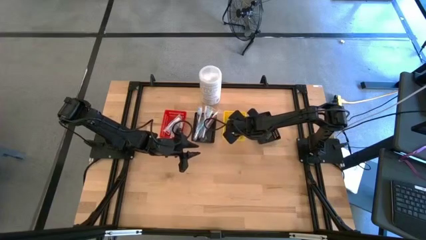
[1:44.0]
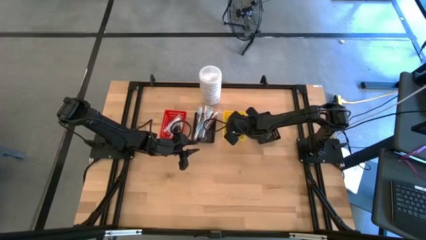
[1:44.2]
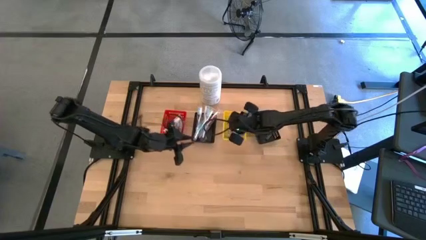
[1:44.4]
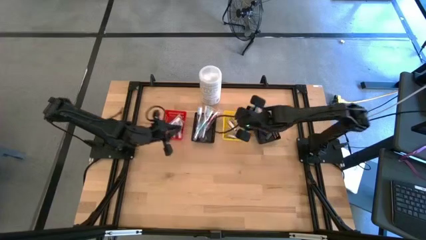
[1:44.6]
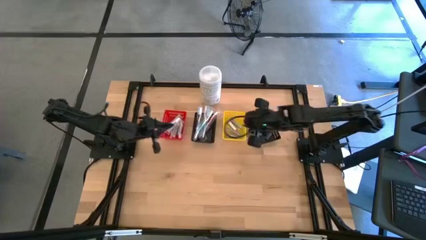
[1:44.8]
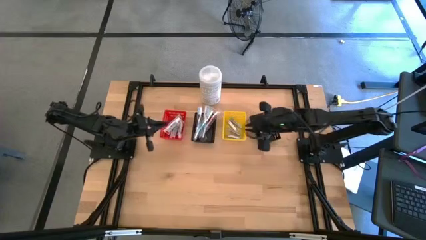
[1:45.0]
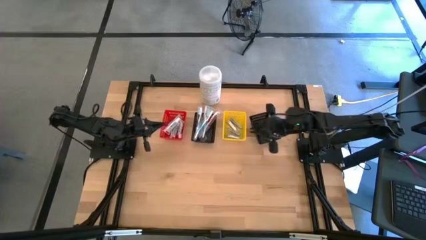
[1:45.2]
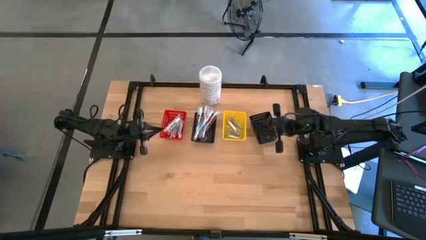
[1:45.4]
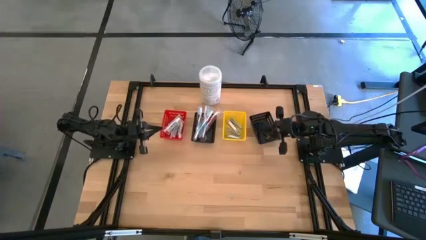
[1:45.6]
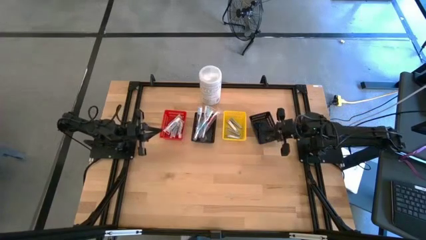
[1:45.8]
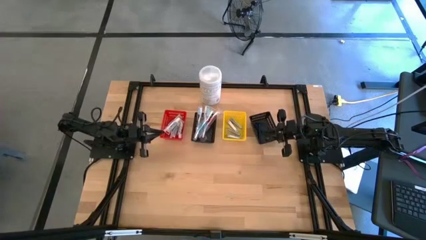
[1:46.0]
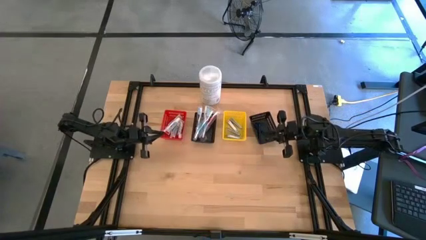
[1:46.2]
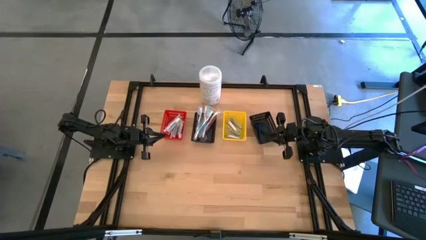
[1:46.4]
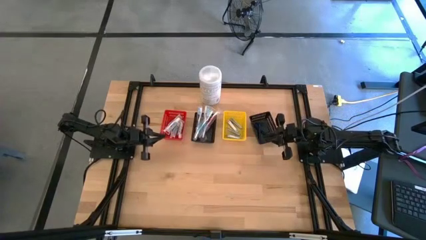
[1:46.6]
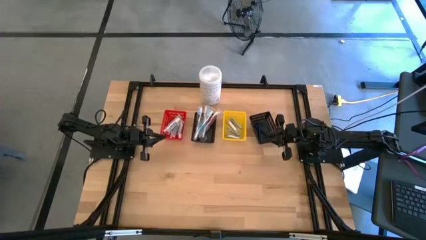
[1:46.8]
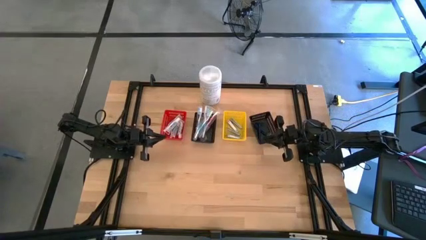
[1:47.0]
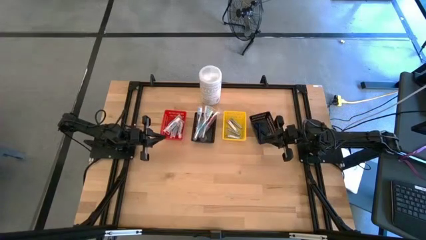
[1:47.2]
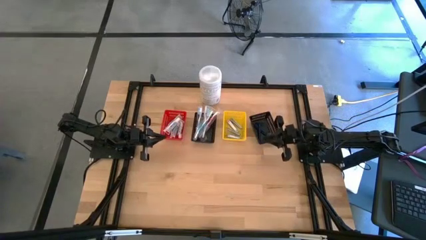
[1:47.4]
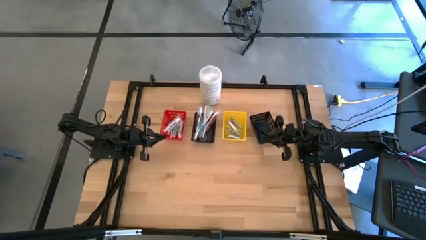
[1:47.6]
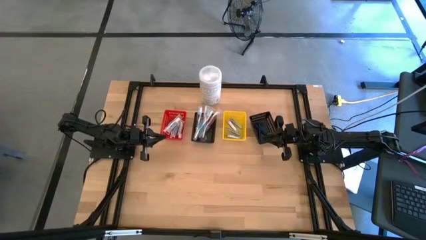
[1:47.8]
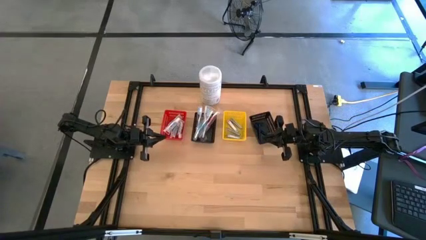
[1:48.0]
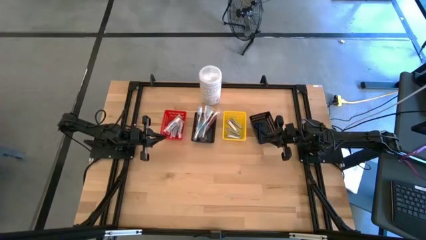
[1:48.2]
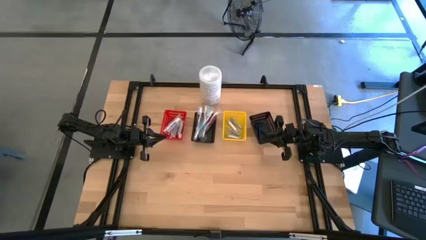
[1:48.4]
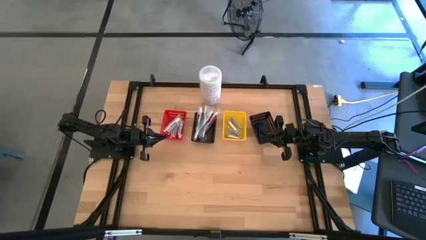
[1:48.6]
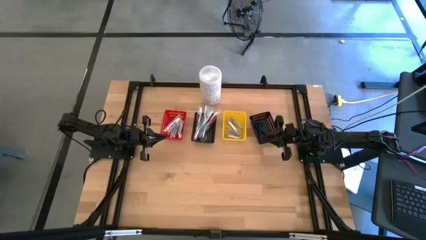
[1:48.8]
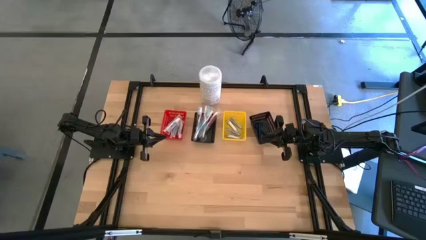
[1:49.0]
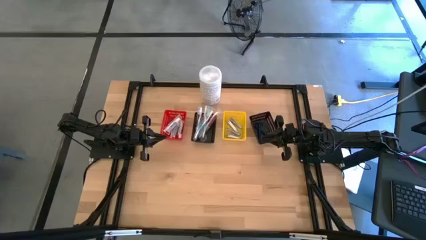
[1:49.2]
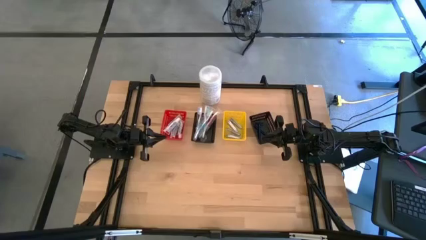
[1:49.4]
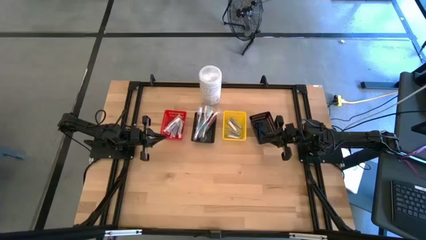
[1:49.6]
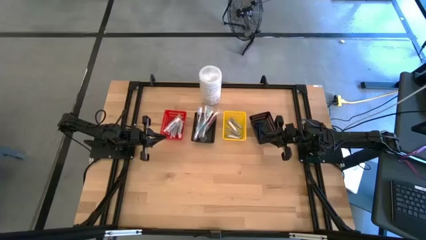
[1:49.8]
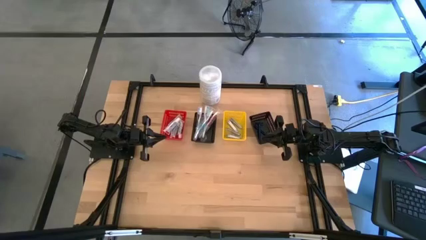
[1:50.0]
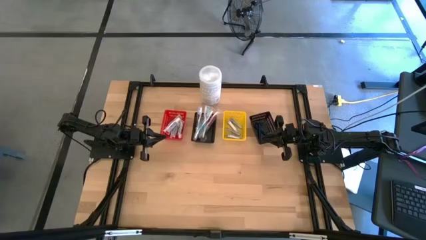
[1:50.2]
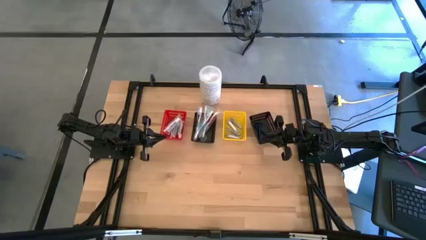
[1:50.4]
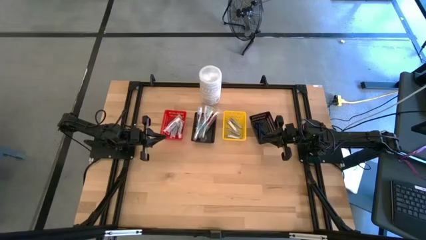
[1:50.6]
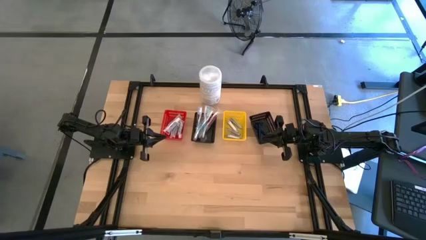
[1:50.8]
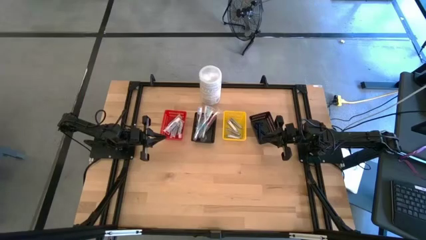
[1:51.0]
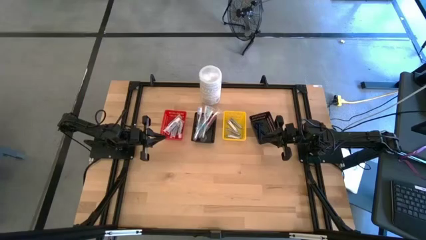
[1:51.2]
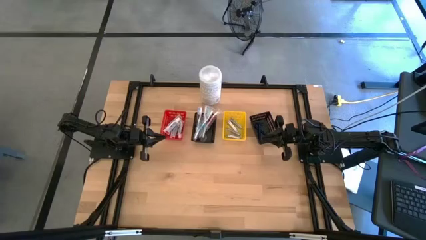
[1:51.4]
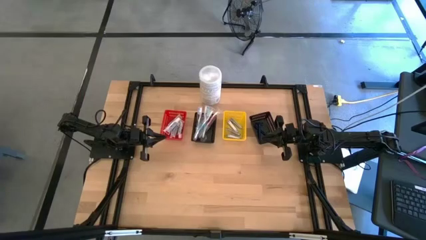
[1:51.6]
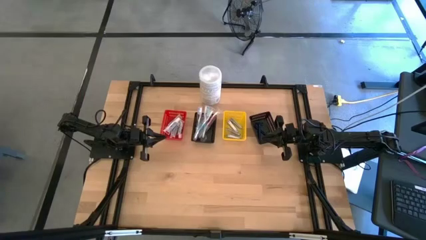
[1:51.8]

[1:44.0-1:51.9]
Task: Pick & Place Travel size toiletries
Return to Home Position

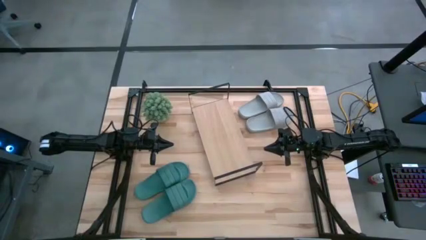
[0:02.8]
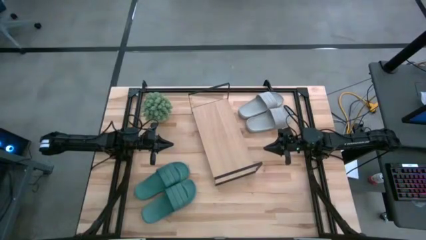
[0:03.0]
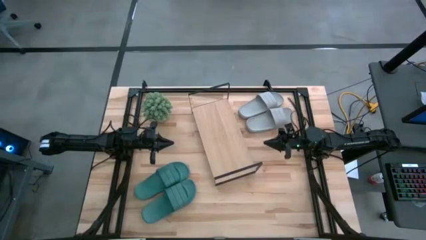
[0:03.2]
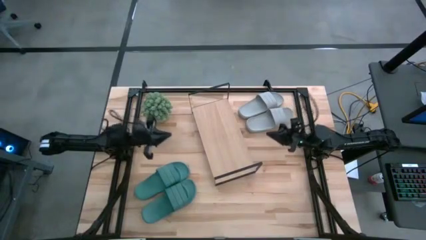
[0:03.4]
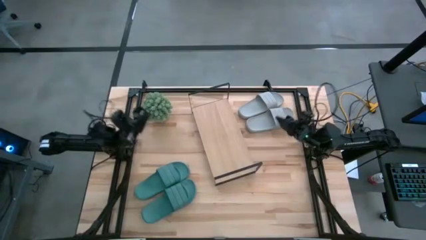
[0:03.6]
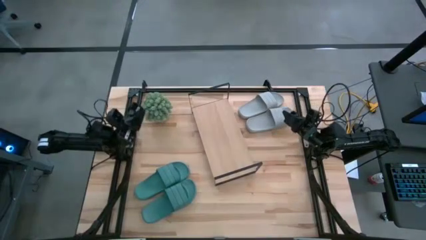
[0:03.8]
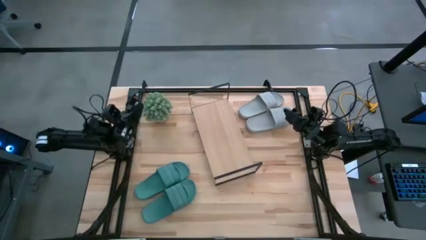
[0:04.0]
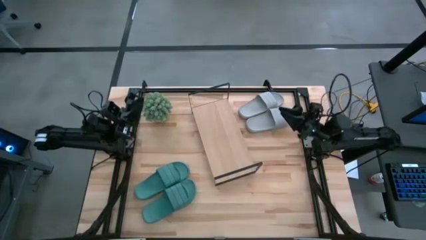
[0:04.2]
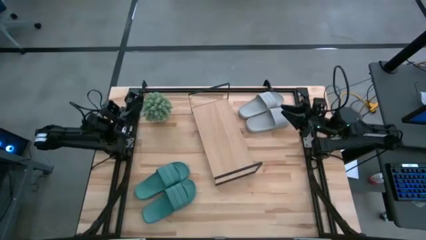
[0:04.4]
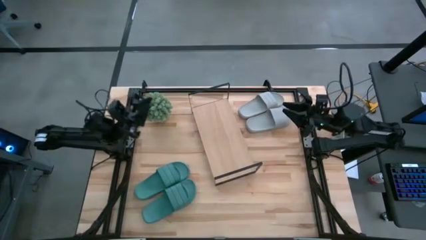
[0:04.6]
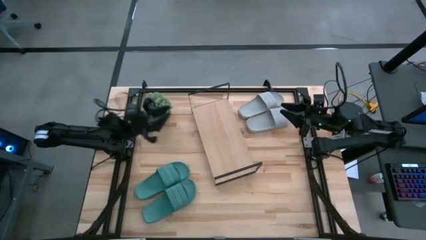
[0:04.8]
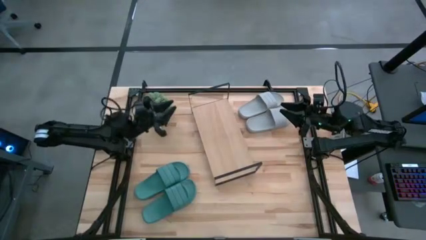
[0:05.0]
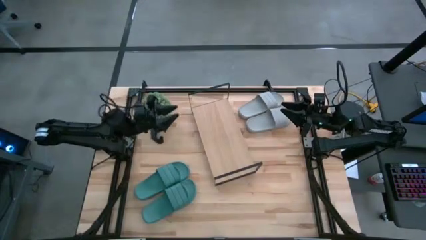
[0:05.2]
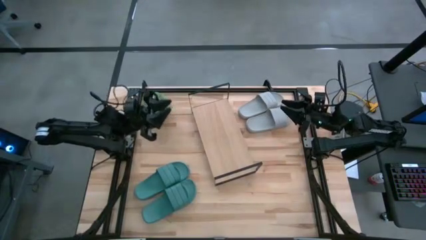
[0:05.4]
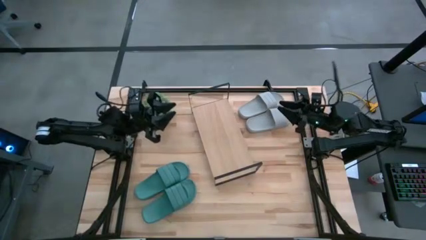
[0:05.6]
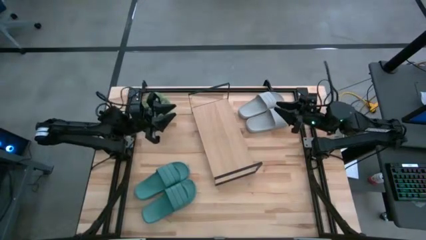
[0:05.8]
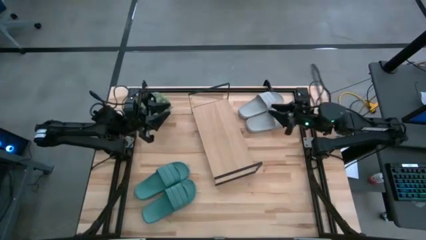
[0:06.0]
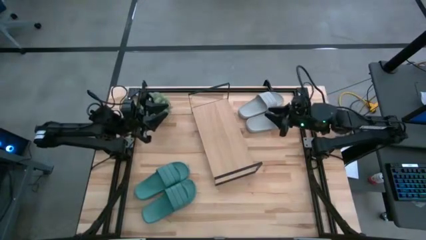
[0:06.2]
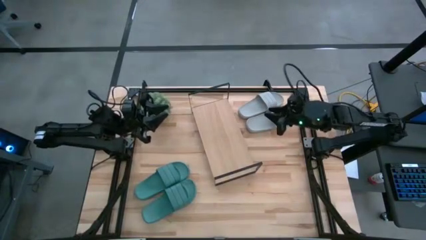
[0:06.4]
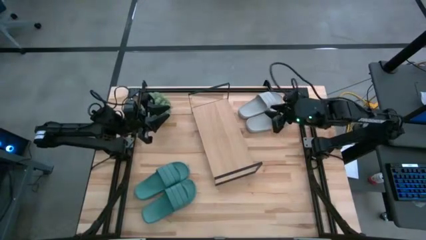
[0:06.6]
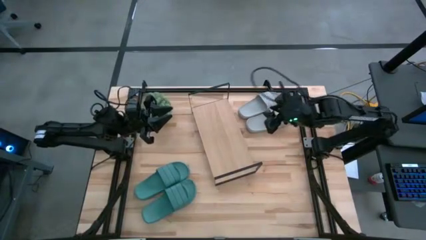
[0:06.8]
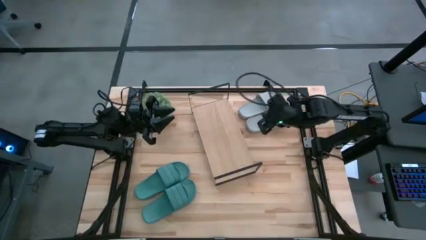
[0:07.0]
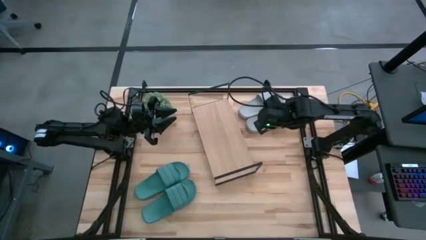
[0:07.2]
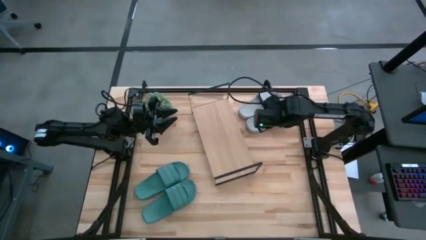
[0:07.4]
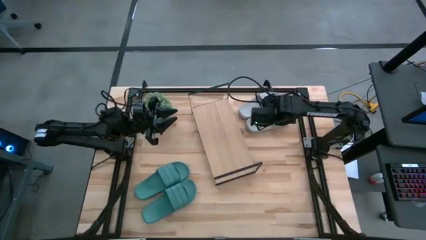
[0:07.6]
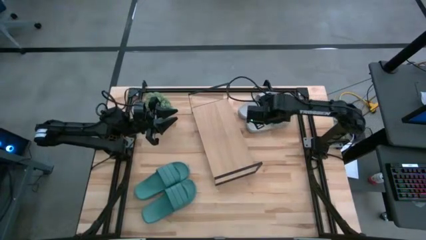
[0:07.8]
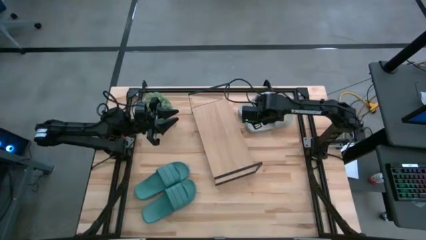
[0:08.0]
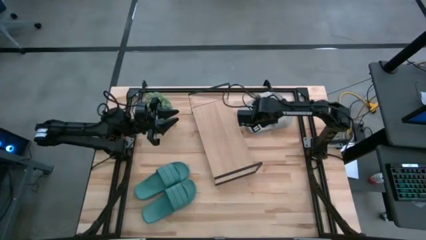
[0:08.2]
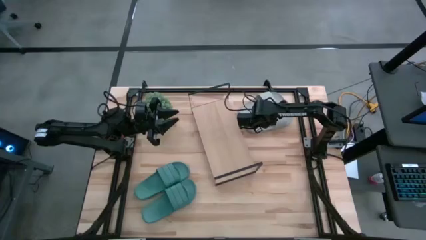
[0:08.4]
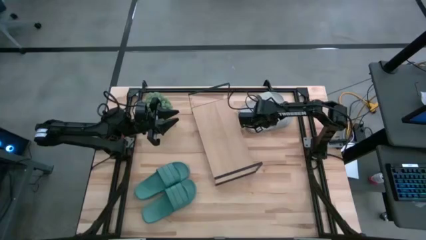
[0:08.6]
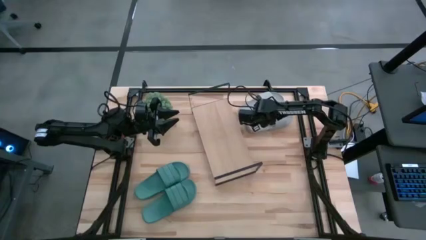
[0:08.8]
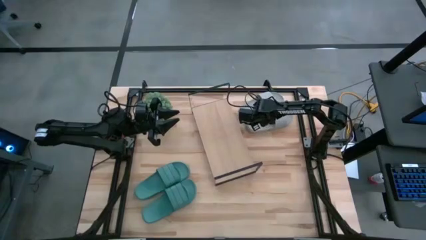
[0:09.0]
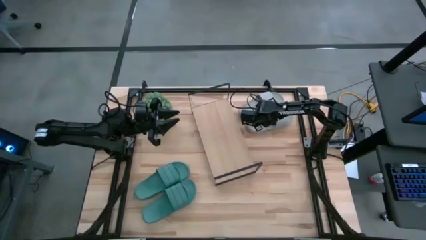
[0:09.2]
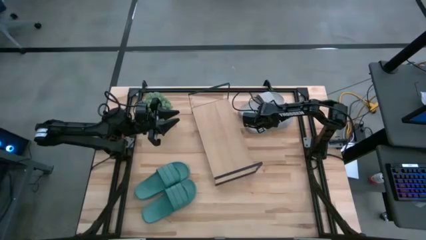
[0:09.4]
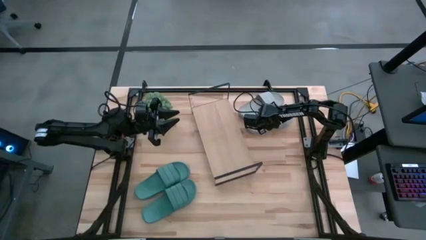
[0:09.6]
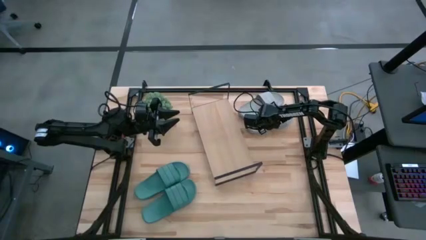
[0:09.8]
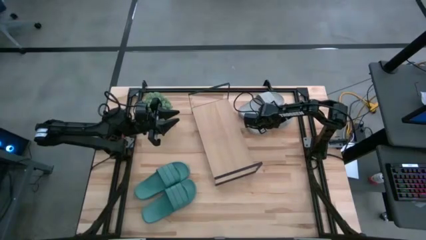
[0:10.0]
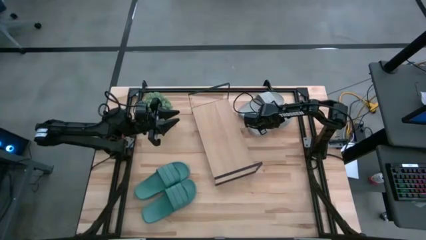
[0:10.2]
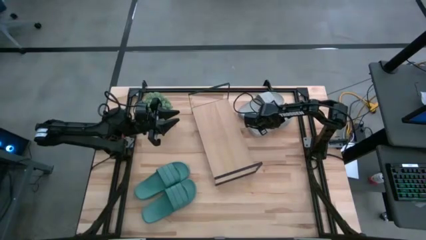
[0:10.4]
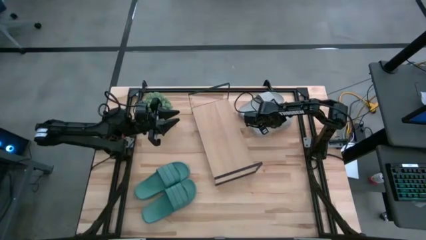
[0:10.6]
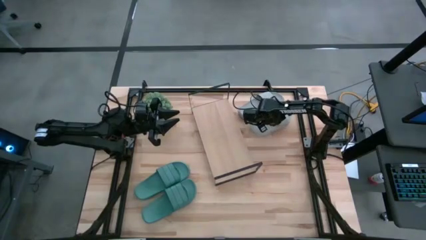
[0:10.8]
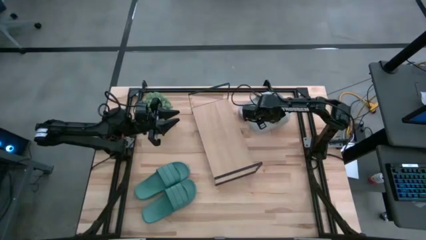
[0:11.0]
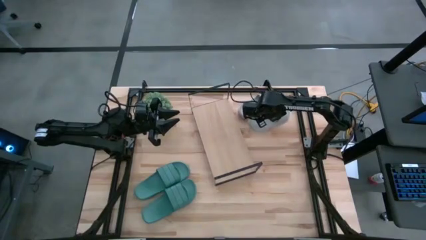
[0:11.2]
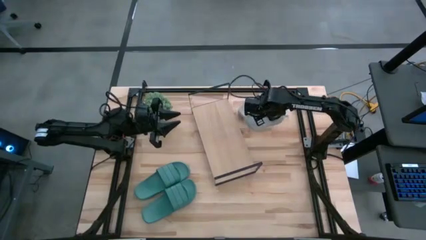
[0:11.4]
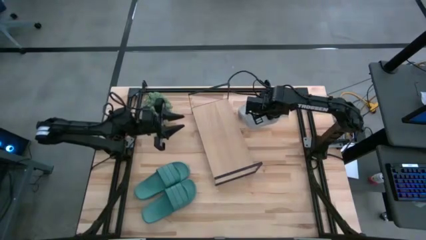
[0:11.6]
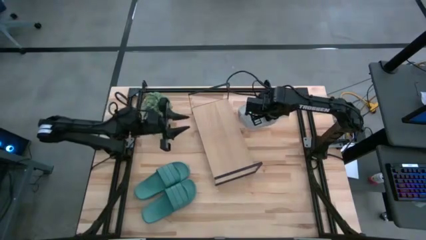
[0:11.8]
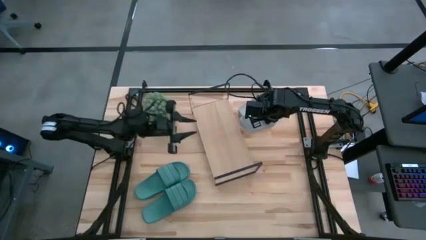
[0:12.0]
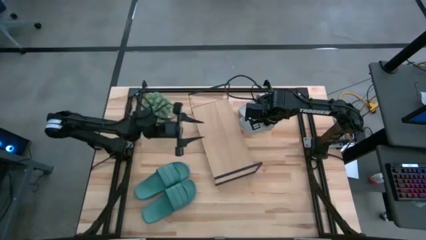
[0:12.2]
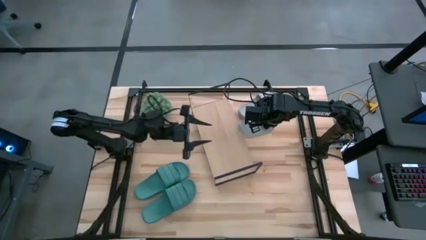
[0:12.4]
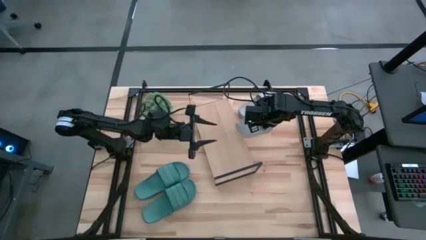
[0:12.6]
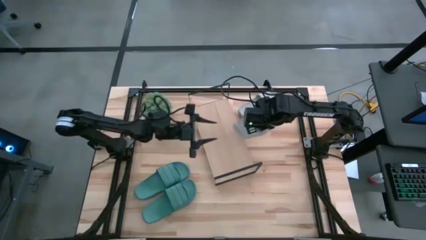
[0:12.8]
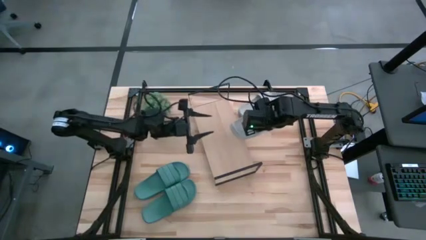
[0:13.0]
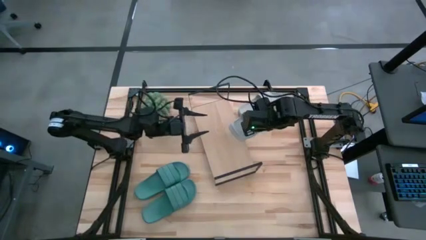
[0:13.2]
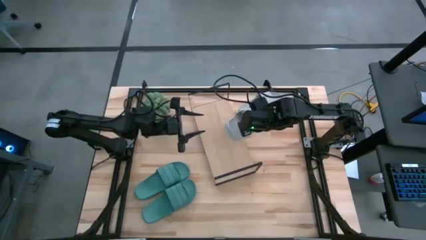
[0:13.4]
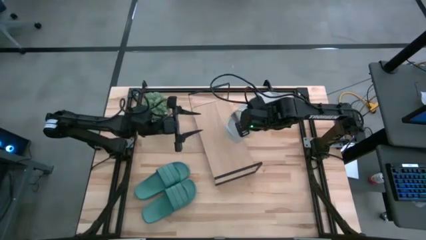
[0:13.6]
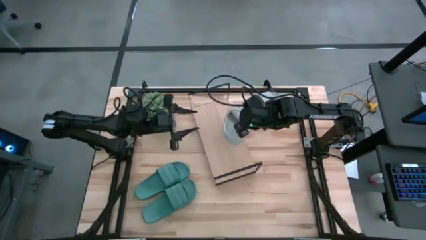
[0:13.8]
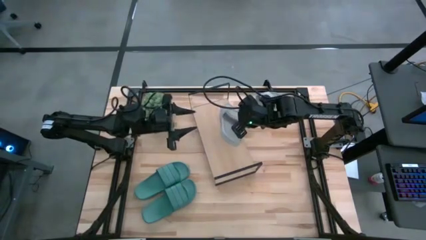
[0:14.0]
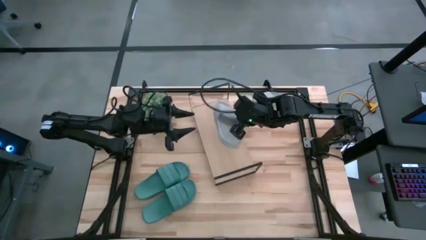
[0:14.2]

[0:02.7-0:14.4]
Task: Pick and place slides into the shelf
Put the gray slipper on the shelf
